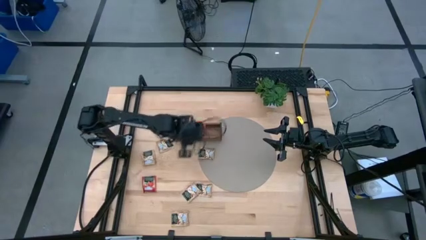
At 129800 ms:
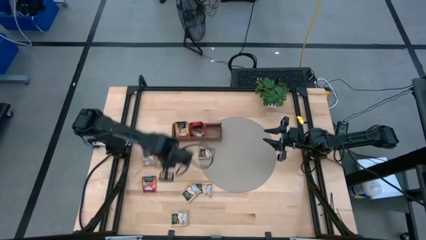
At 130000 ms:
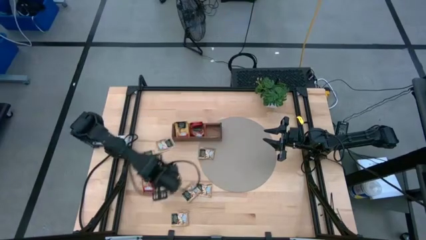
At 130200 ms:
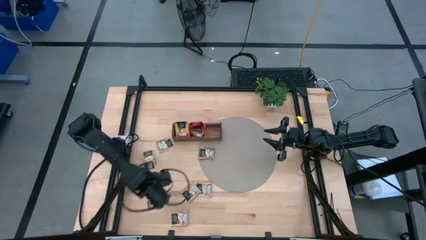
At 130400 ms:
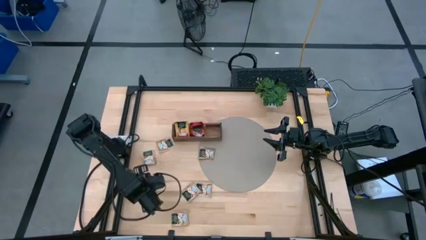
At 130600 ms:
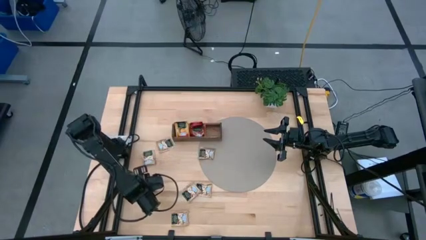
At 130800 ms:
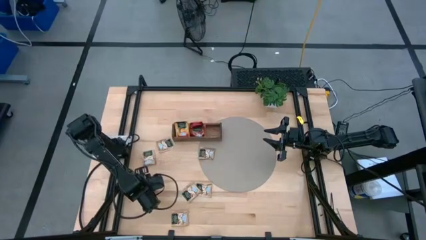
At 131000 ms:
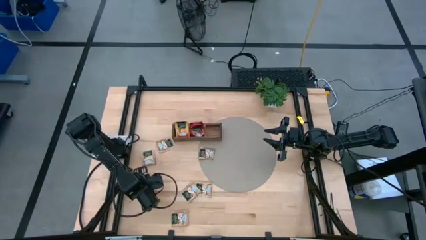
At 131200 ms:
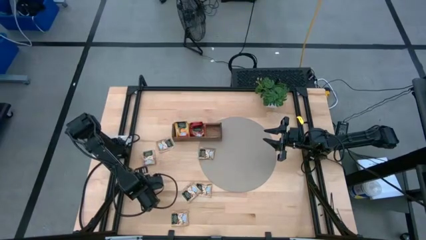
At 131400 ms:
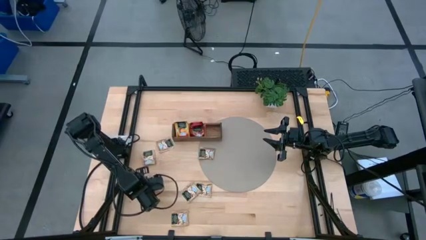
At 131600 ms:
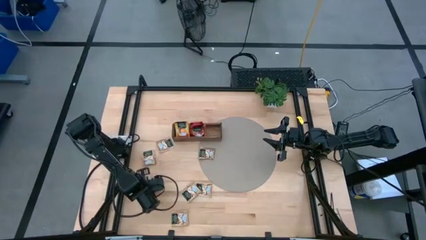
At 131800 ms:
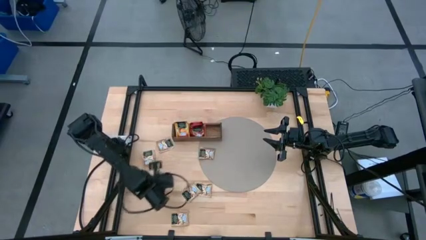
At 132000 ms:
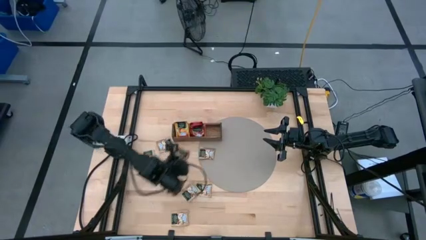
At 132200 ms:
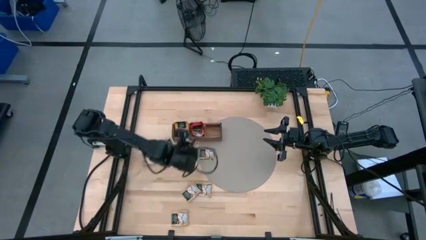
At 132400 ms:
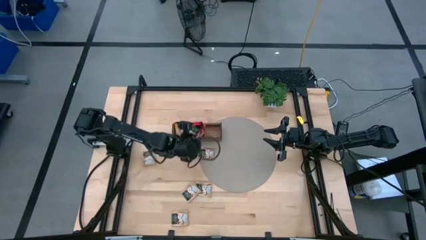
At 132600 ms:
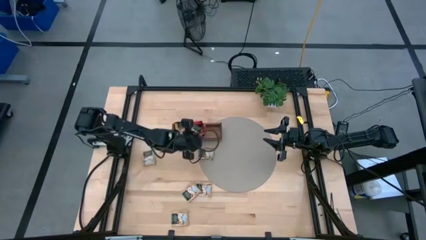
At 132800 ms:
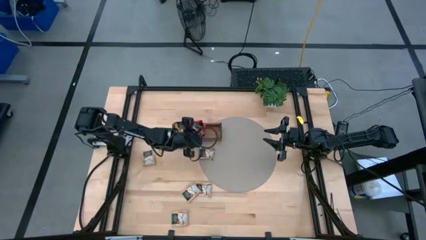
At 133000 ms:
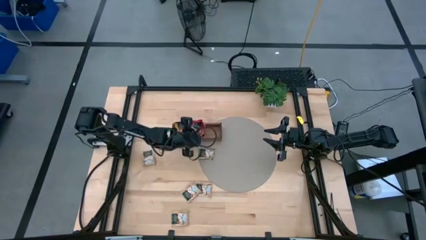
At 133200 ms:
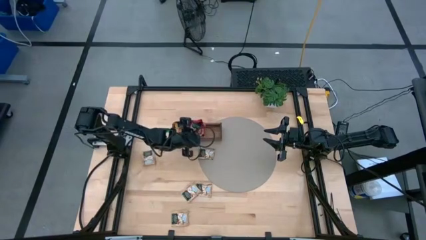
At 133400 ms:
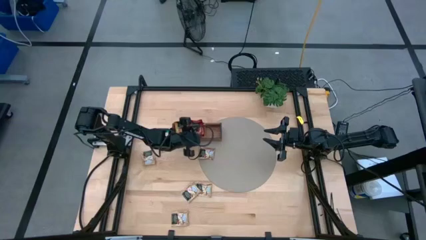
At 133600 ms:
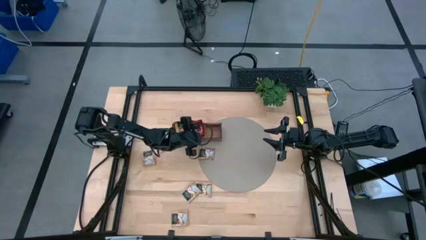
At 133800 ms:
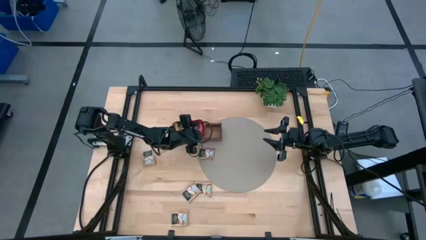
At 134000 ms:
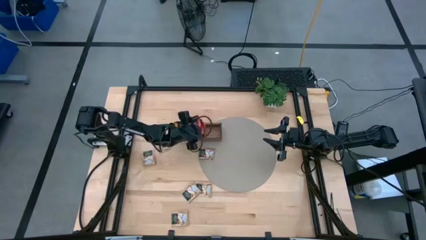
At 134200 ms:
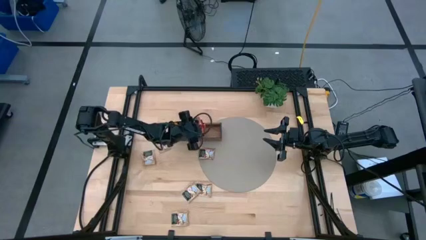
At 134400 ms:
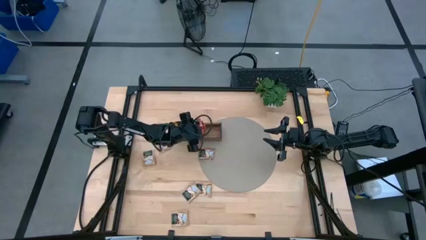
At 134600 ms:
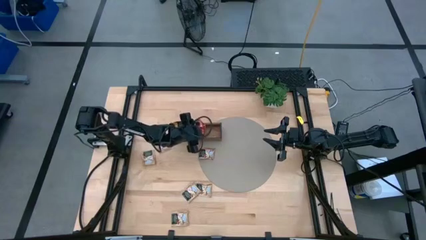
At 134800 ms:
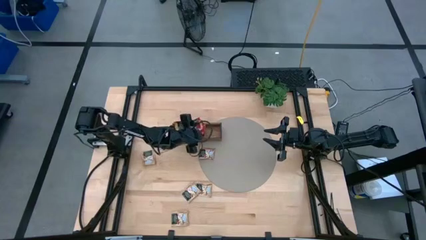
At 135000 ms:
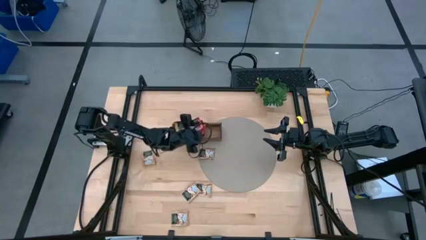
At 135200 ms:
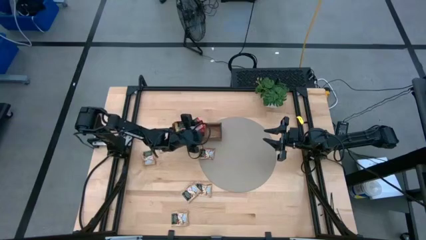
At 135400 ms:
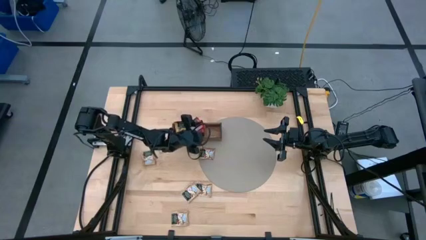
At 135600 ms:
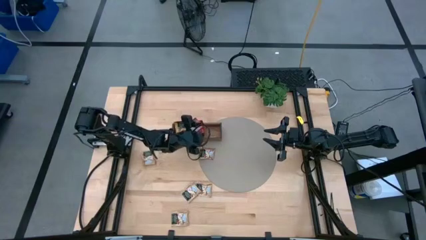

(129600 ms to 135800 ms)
Task: Pick & Place Tea
Put the red tea bag into the middle section of the wooden organizer

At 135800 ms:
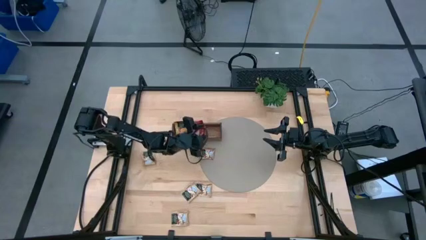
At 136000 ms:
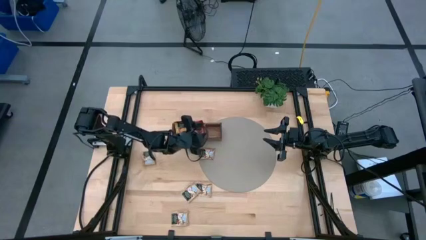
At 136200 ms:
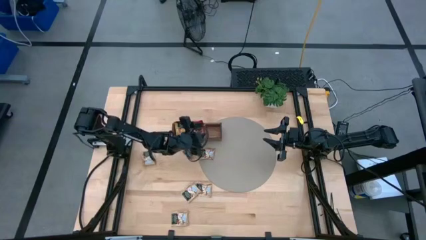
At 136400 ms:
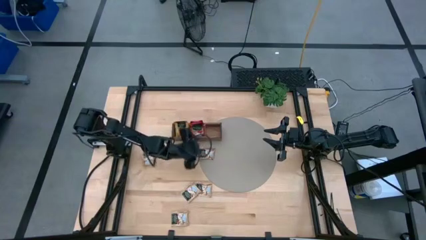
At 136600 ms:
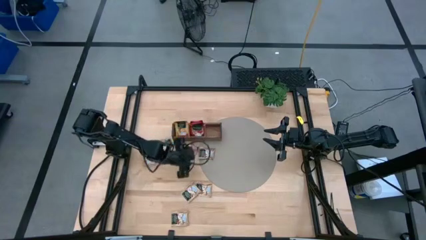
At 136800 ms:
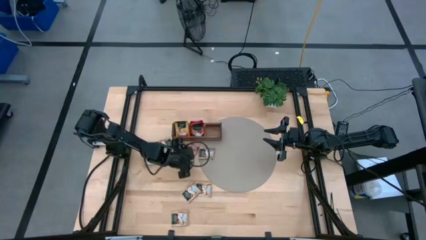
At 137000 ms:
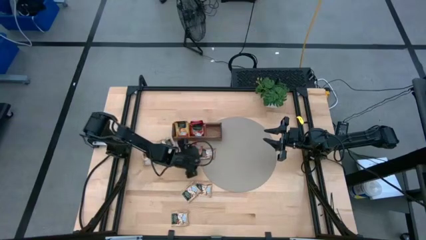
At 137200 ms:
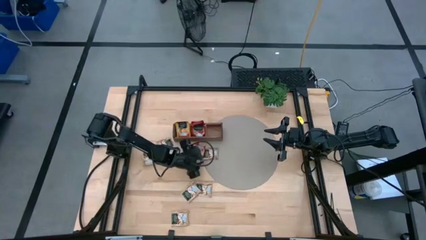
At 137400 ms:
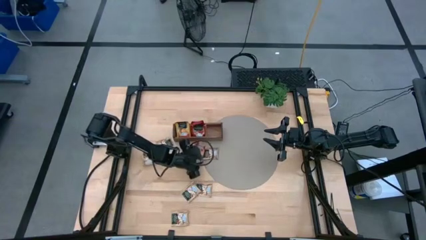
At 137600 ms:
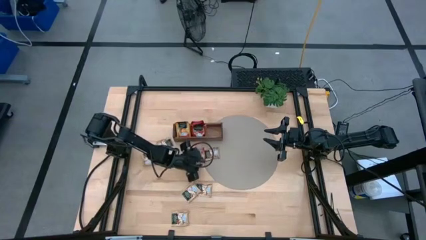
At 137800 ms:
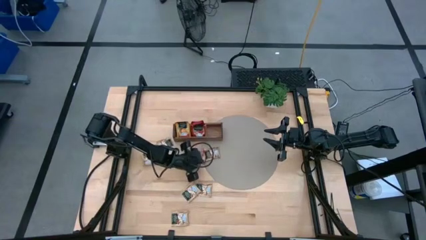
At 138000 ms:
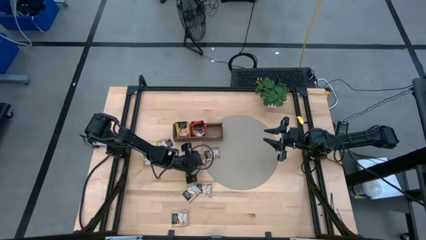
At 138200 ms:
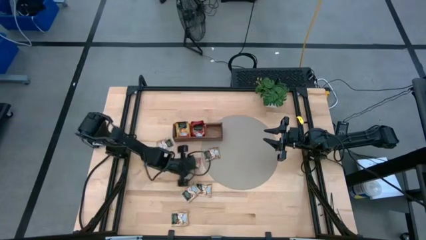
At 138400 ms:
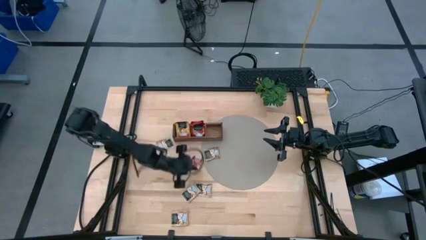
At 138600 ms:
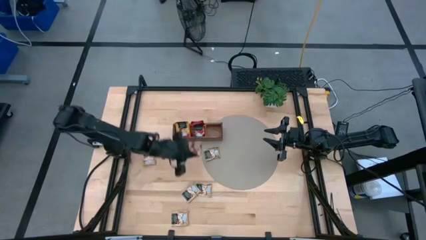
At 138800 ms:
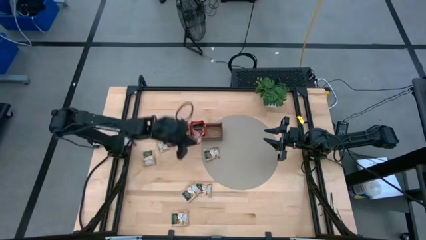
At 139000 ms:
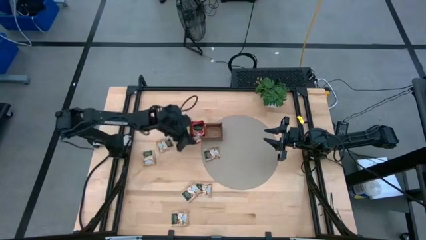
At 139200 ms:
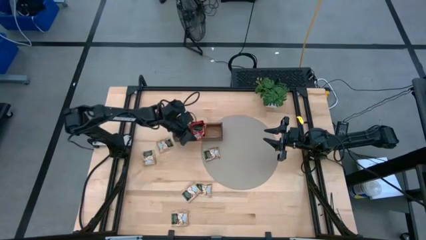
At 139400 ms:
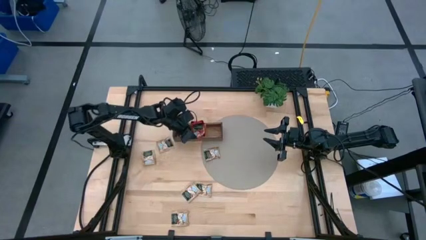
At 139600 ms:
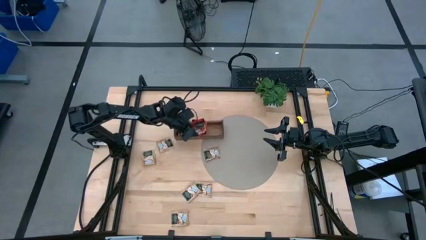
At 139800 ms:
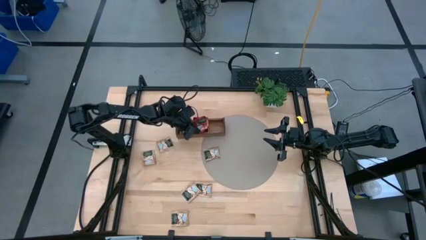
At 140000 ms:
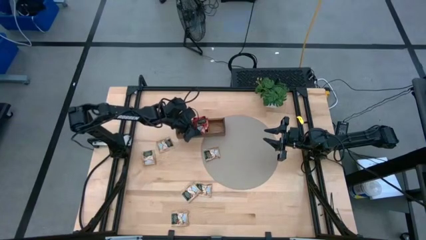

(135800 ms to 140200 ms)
Put the red tea bag into the middle section of the wooden organizer

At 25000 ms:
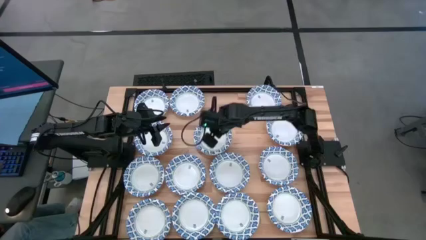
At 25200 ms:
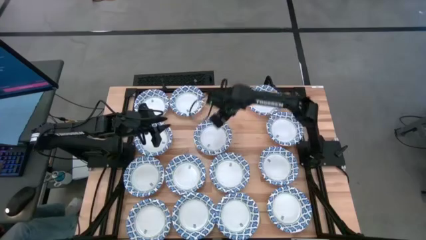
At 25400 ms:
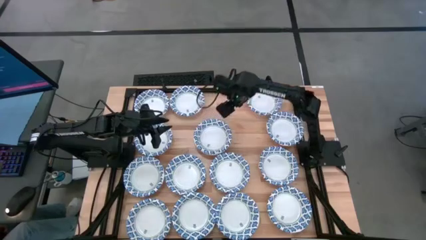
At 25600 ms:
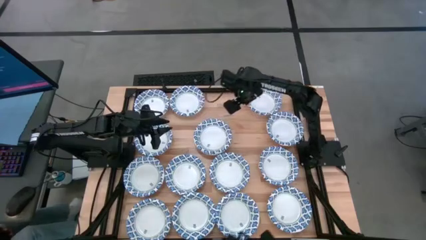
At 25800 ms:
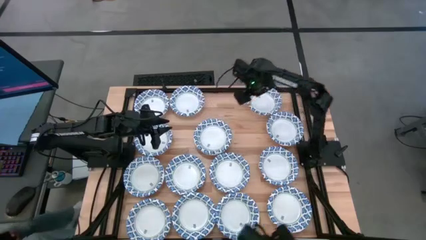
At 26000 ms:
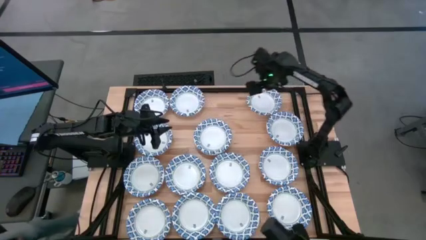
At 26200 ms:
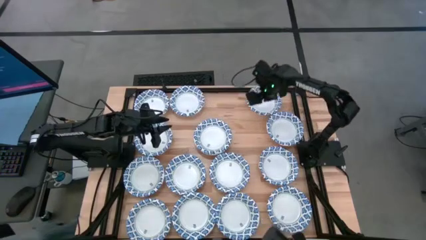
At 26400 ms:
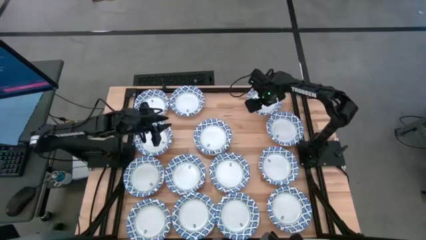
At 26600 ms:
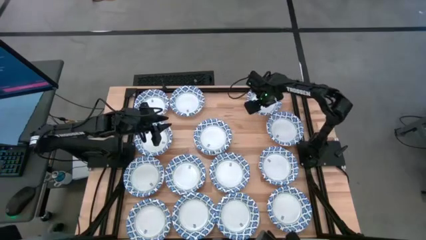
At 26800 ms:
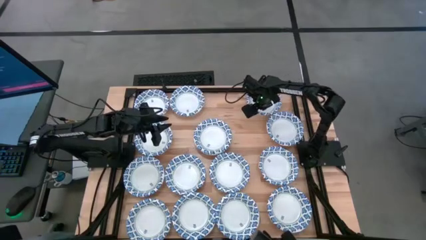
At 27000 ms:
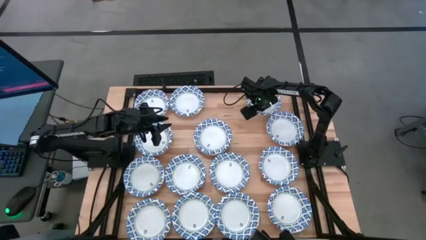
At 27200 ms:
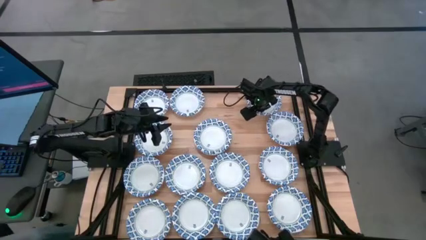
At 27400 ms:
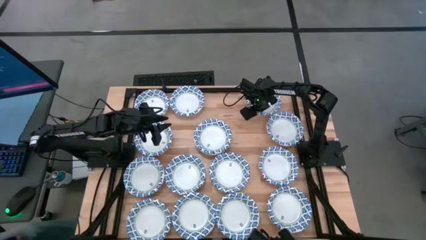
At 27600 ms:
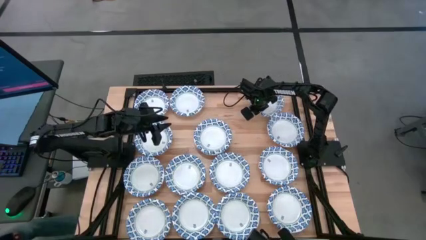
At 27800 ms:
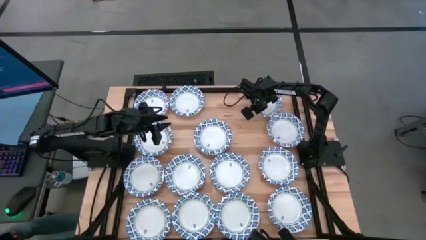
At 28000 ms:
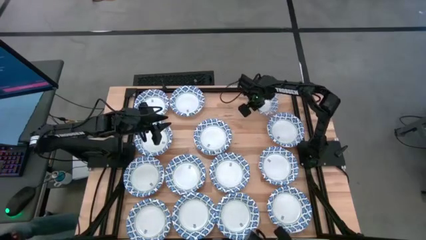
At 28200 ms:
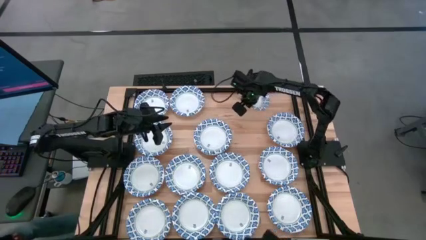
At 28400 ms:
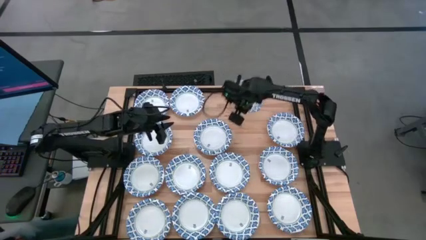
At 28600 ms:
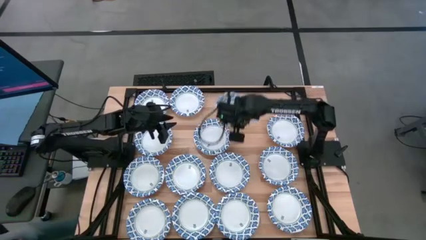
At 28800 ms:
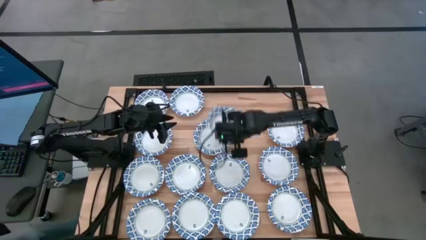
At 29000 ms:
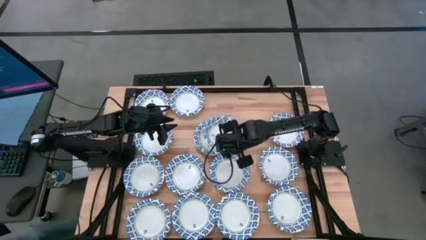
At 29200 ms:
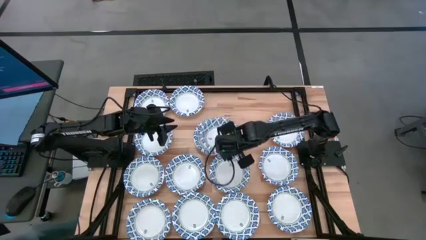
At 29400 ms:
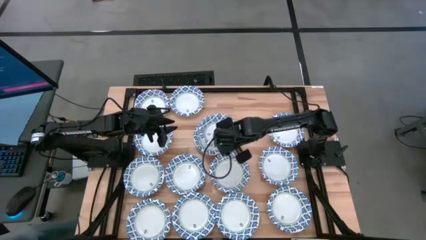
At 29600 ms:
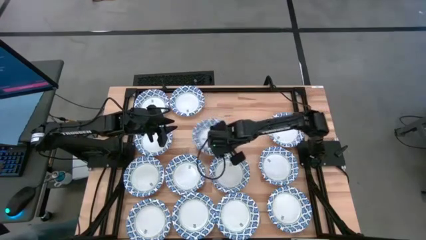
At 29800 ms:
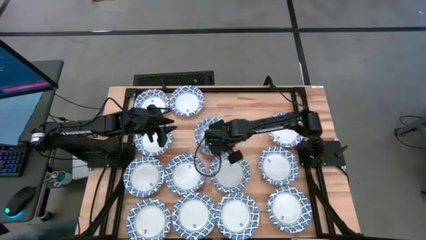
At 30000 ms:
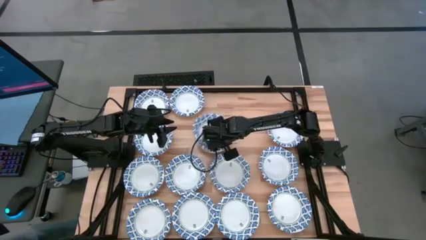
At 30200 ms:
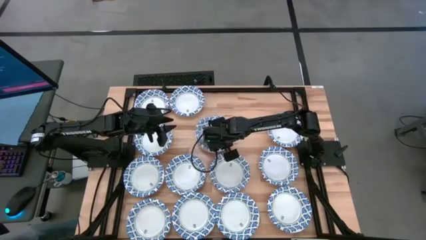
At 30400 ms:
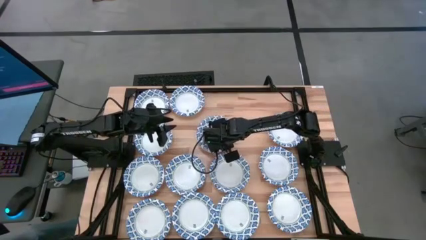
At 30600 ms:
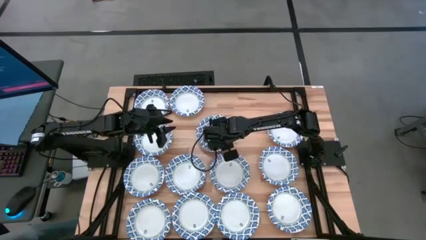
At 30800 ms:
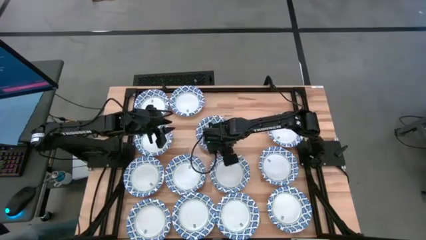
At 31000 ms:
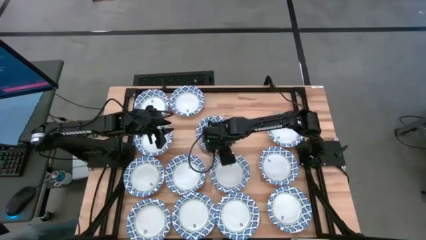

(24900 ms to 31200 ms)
Task: Nest bowls inside each other
Stack the blue bowl on top of the blue bowls
